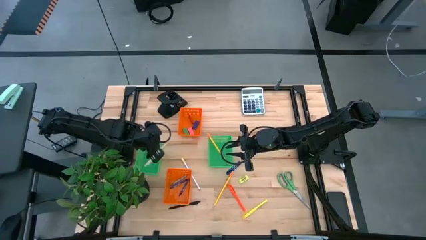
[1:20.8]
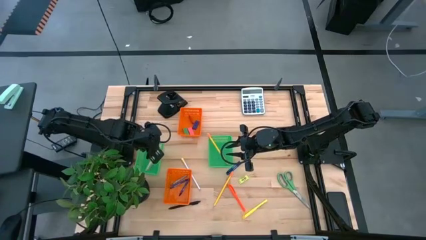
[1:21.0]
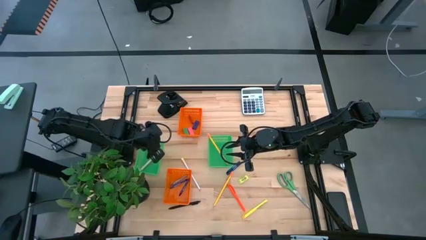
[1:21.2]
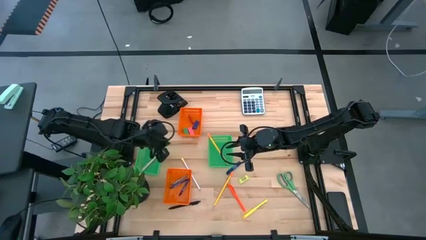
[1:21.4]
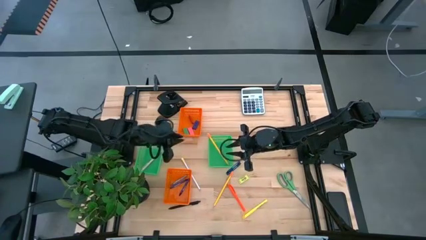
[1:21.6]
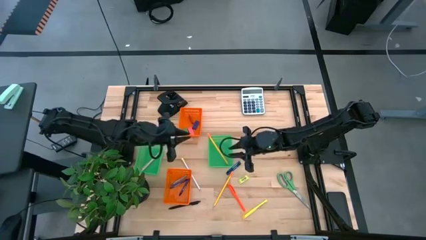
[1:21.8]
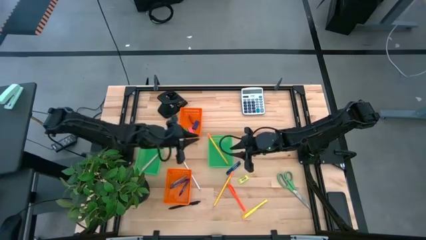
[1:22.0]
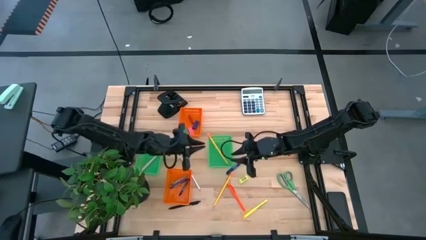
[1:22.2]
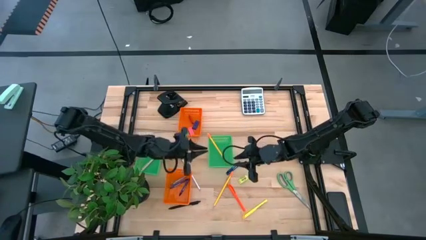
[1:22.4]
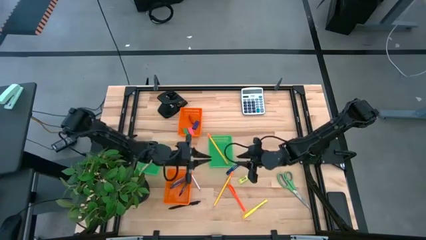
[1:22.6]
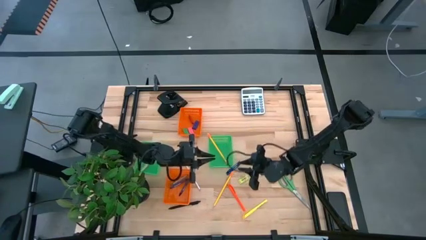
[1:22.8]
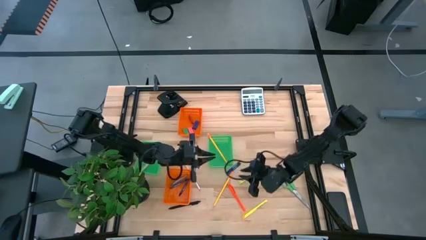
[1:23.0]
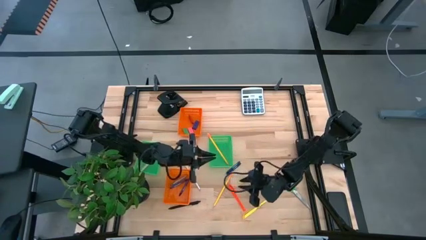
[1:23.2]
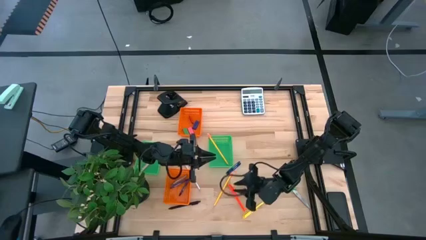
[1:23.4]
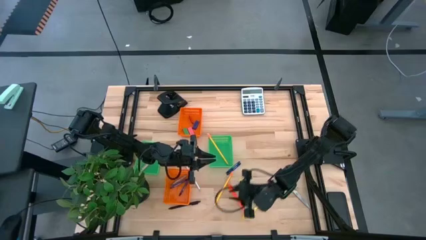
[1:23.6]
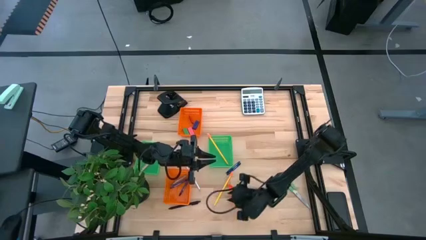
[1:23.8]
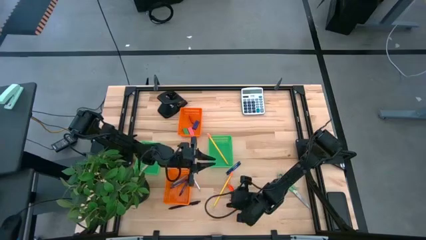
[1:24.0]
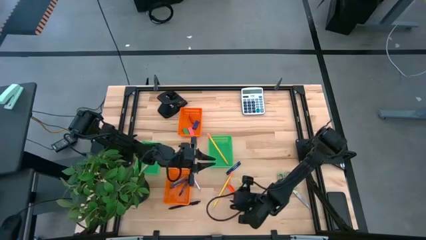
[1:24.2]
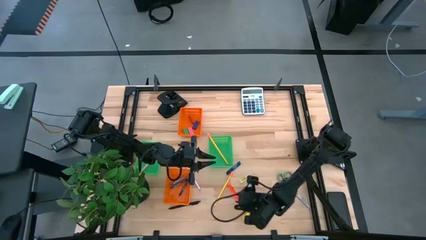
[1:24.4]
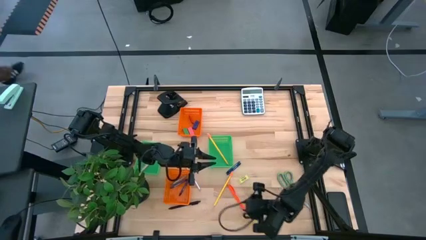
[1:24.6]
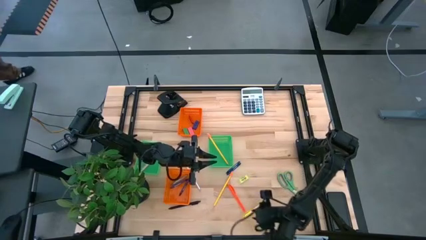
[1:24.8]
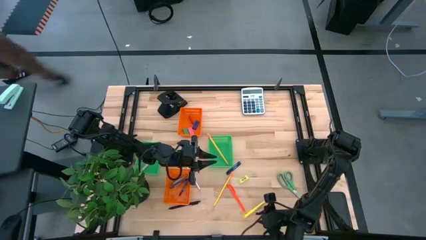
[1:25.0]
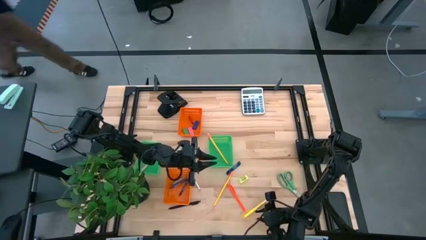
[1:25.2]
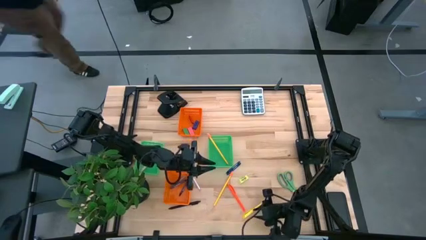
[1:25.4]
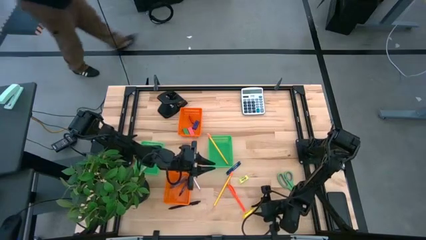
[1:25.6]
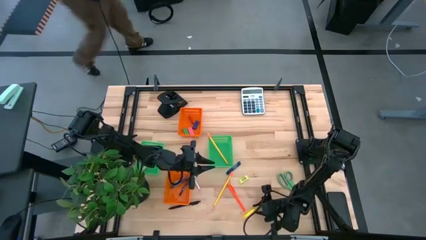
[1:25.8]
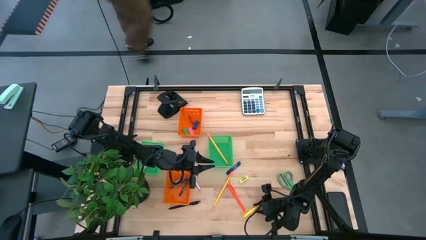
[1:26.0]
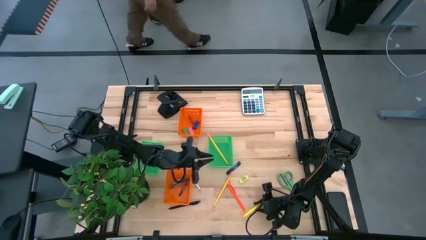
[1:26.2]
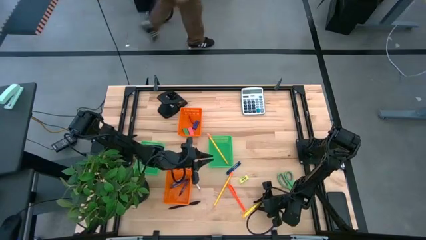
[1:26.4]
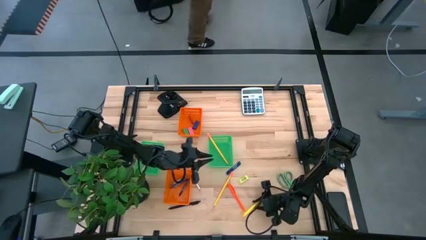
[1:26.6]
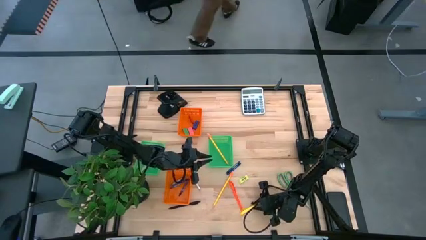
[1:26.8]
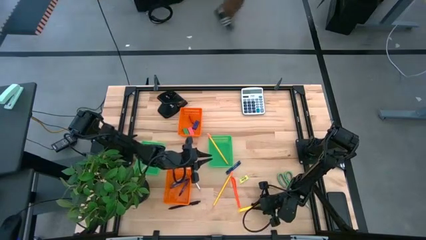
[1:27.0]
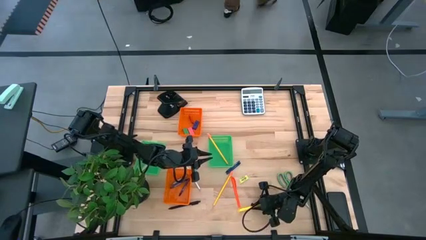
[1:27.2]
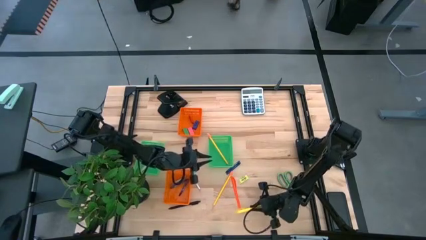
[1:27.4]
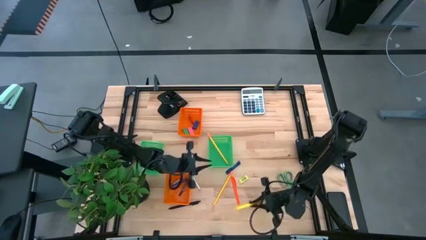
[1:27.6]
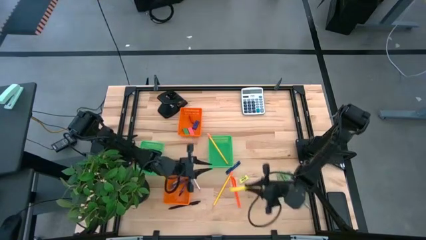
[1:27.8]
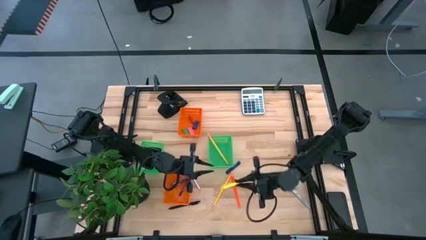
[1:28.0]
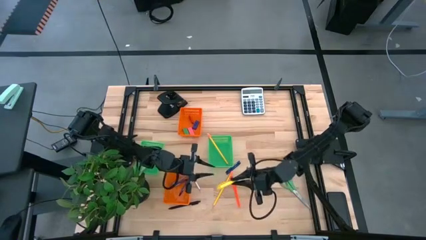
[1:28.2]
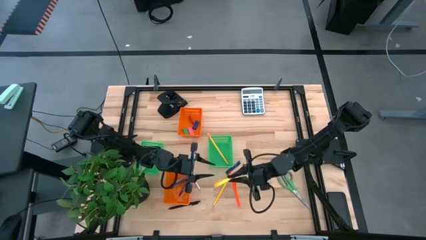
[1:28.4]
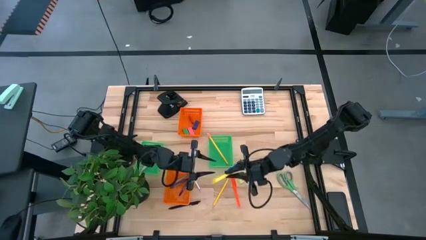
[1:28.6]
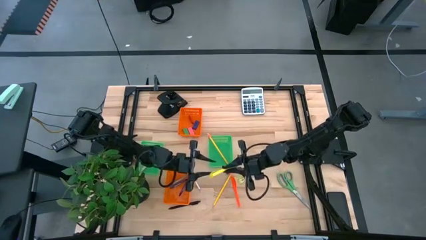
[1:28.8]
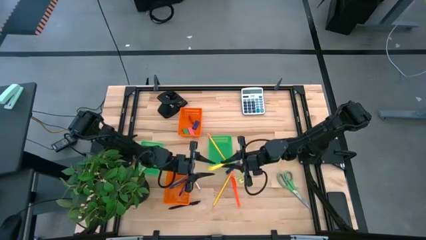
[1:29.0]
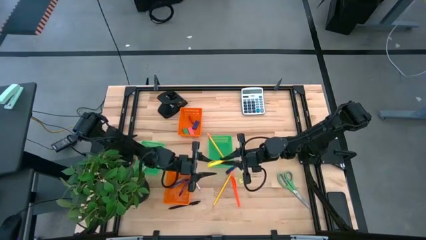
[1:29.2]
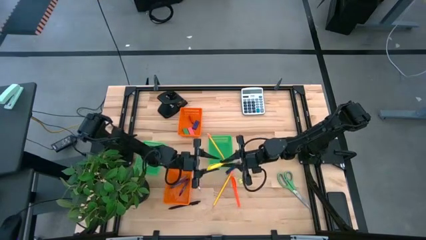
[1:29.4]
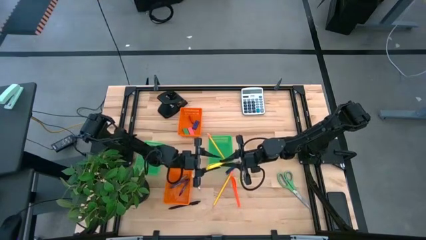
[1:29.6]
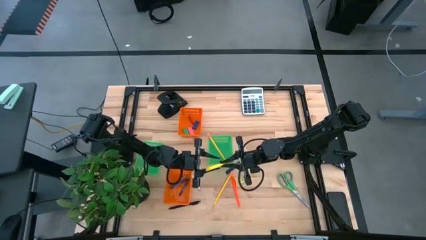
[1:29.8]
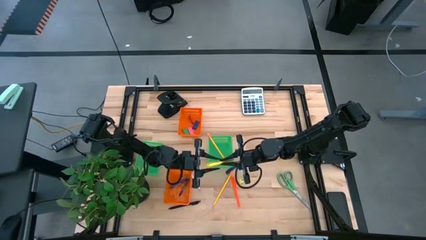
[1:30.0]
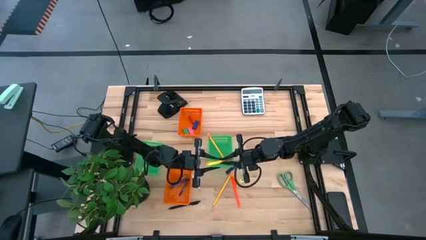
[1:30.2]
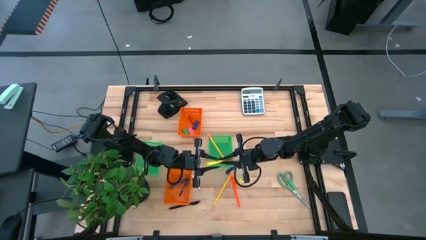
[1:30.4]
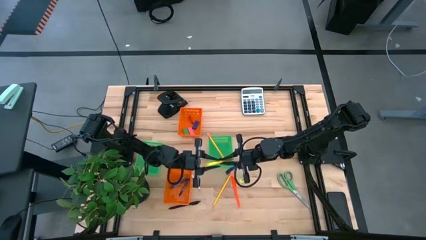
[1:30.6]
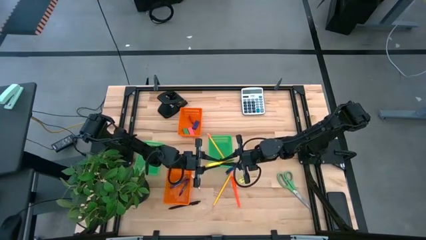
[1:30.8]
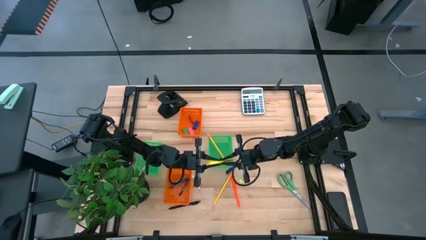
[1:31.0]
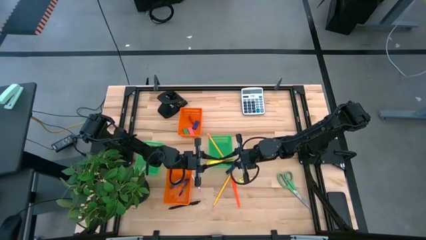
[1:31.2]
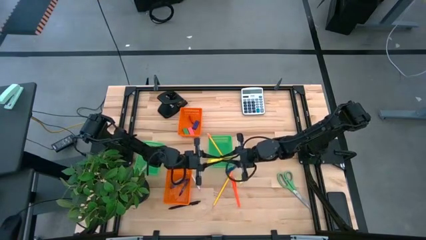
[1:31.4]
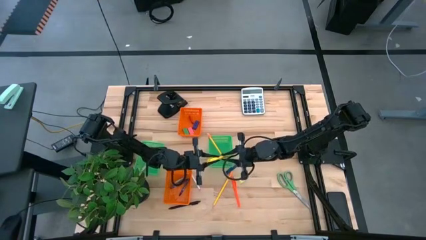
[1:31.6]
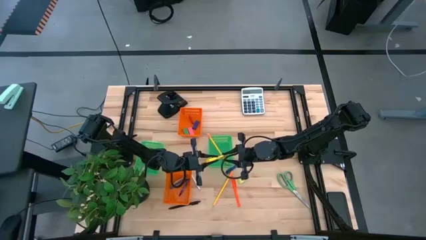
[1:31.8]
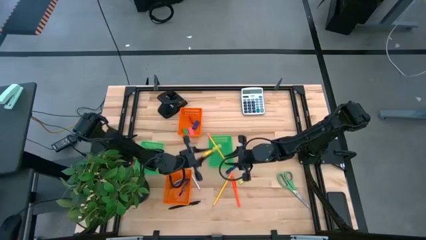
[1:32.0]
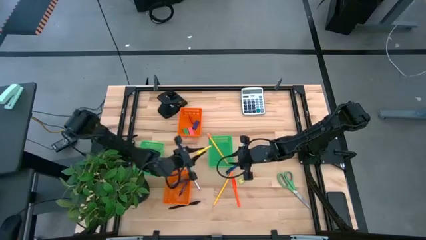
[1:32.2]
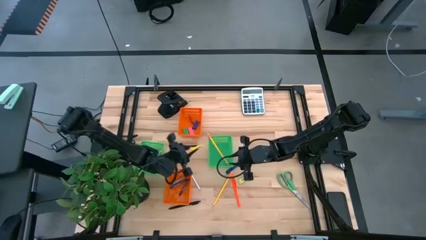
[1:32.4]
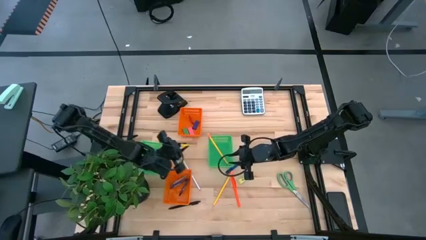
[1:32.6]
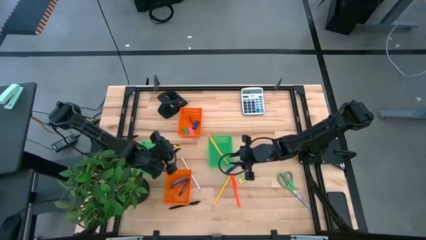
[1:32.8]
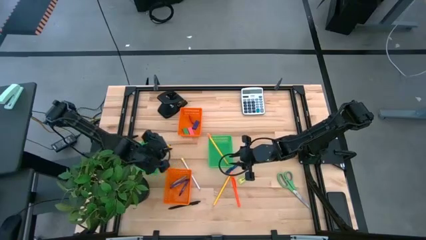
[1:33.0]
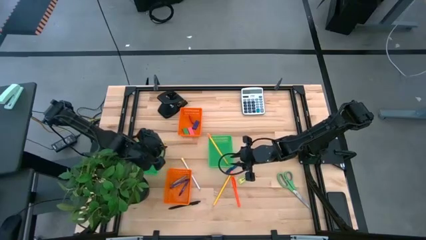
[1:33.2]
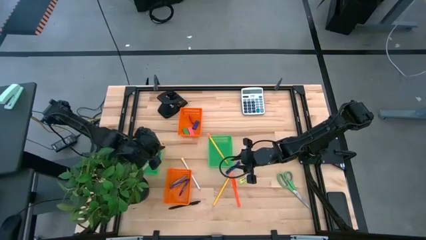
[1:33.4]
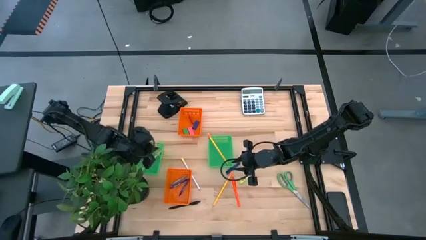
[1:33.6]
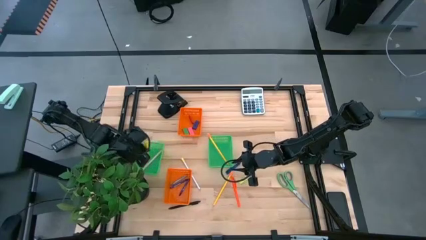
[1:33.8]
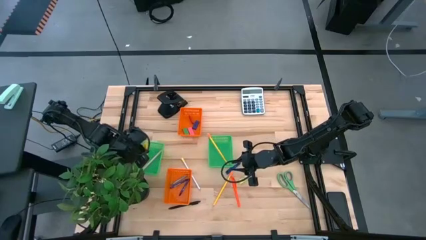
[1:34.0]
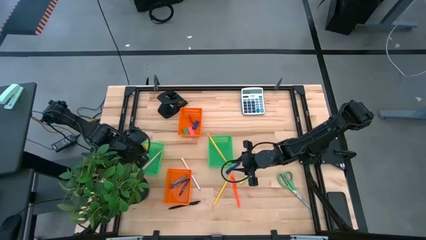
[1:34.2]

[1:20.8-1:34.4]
Task: Sort crayons/erasers/pens/pencils in bins
Put the yellow pen into the left green basket

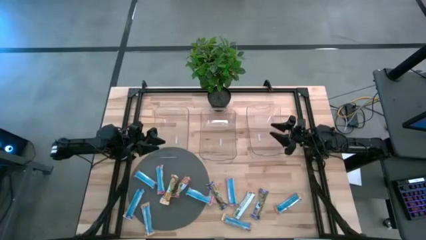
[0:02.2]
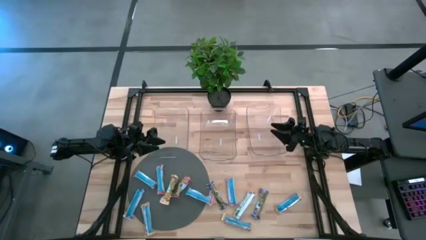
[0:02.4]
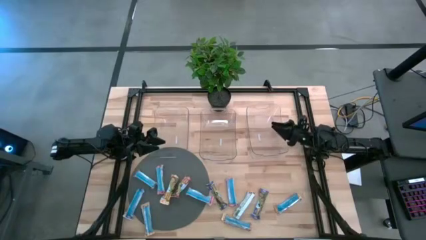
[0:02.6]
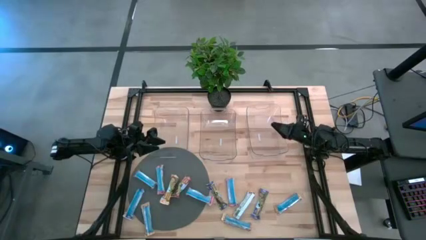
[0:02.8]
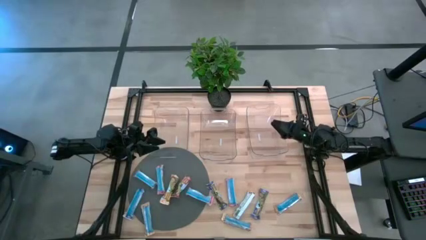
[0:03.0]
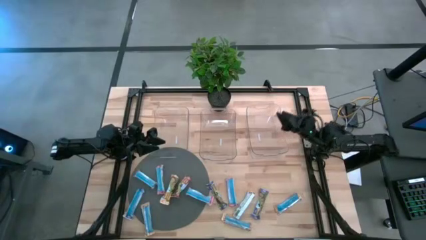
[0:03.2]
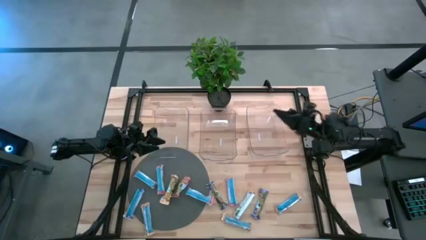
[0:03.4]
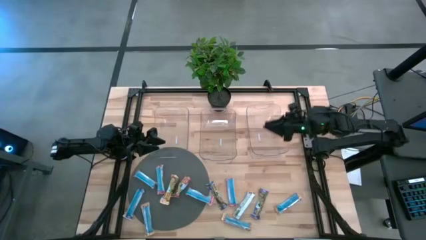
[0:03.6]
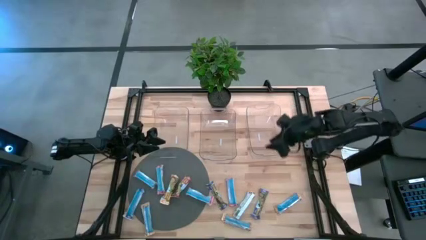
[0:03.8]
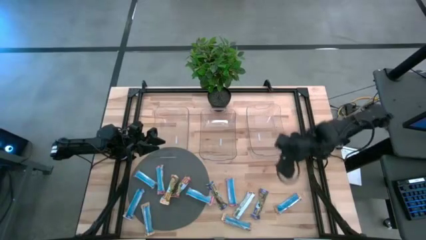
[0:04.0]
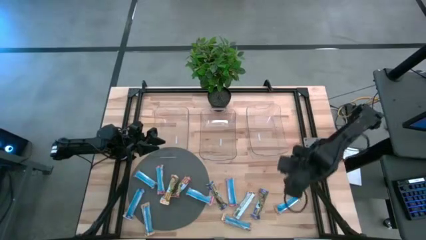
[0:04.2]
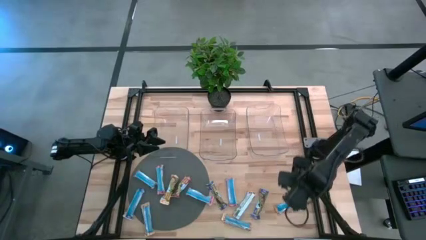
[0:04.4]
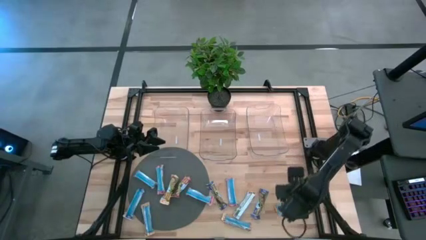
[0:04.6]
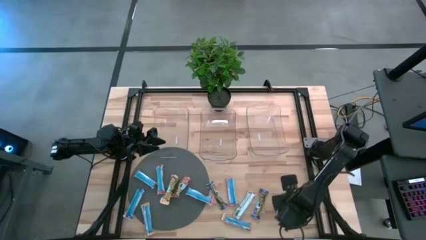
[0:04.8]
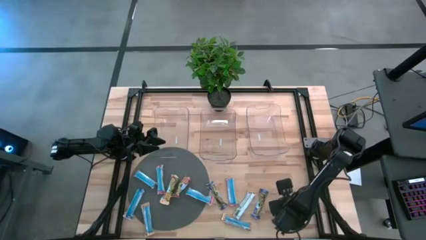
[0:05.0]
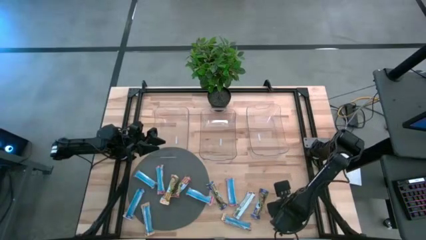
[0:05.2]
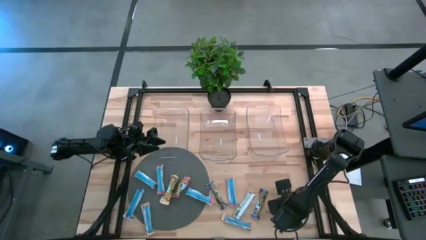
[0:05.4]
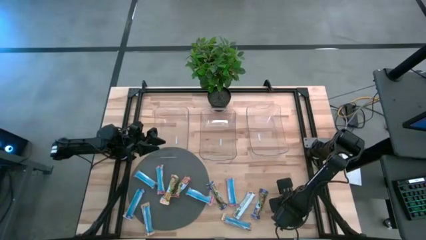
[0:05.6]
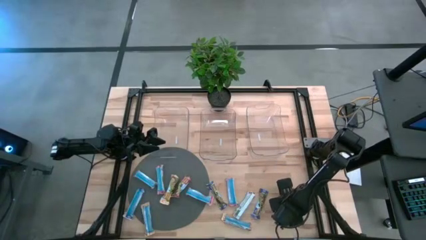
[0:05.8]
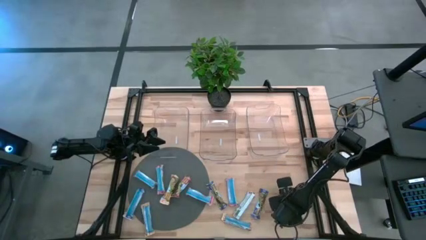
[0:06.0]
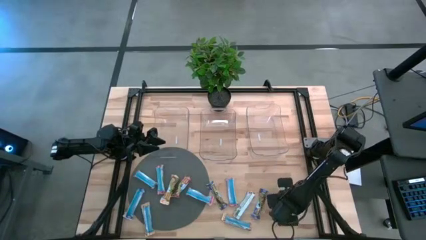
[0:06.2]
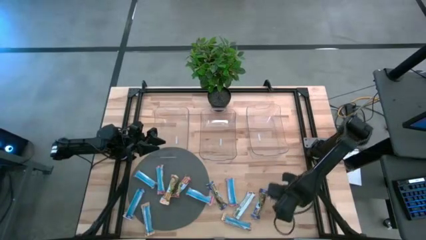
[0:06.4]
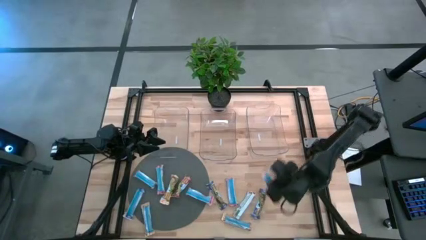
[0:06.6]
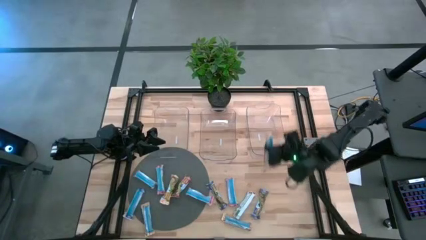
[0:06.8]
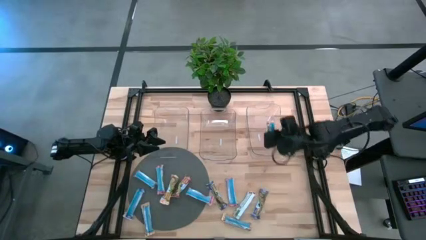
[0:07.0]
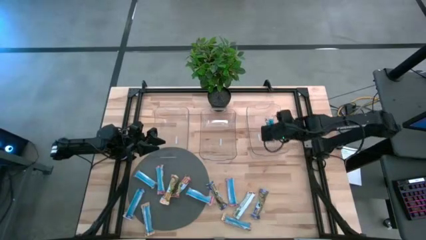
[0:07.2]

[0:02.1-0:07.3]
Task: Pick and place Granola Bars by type
Put the yellow granola bar into the right transparent bin
